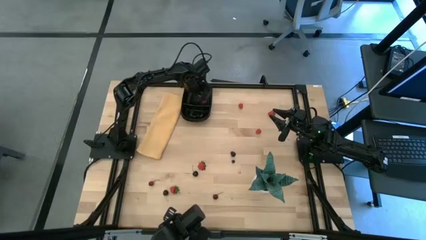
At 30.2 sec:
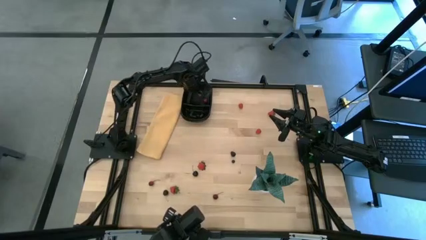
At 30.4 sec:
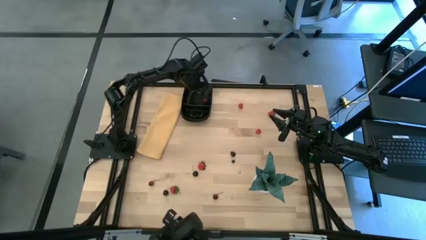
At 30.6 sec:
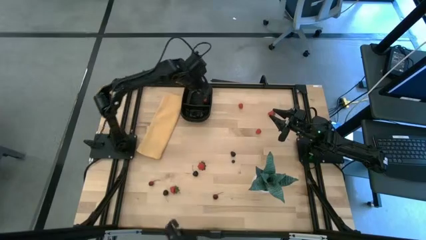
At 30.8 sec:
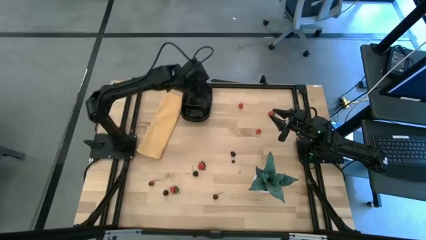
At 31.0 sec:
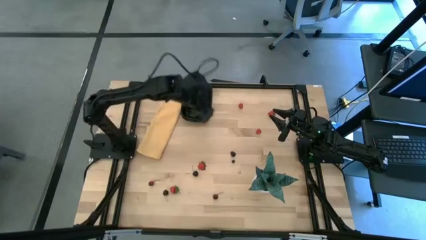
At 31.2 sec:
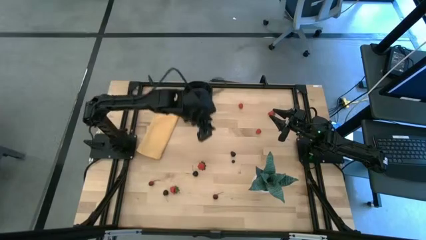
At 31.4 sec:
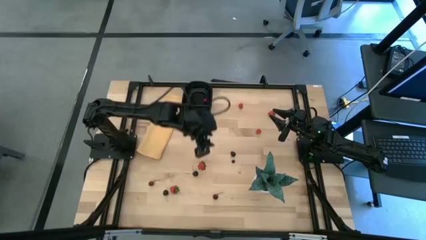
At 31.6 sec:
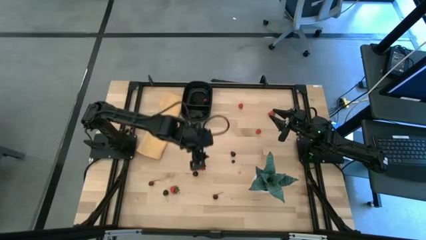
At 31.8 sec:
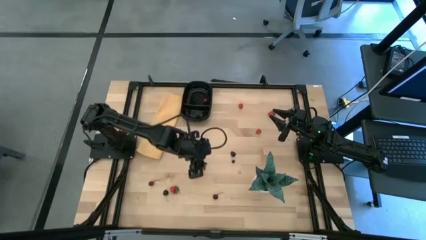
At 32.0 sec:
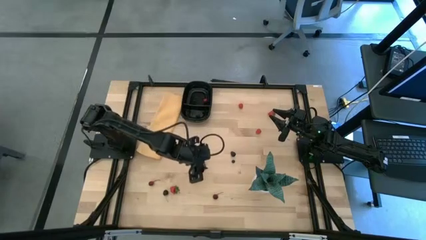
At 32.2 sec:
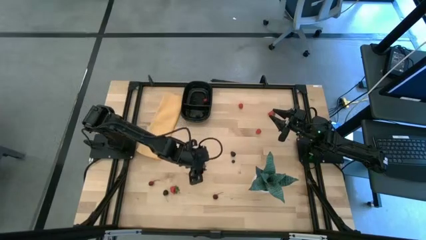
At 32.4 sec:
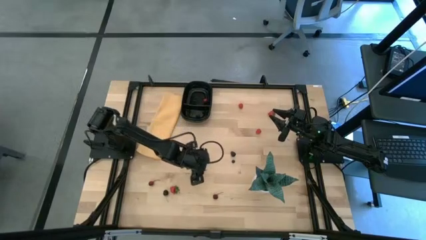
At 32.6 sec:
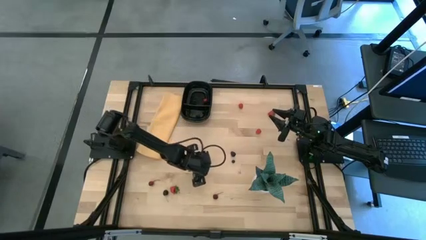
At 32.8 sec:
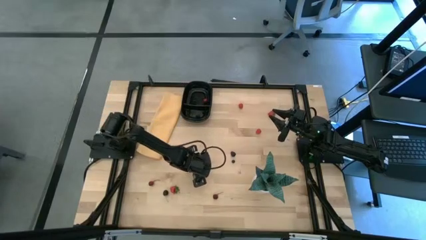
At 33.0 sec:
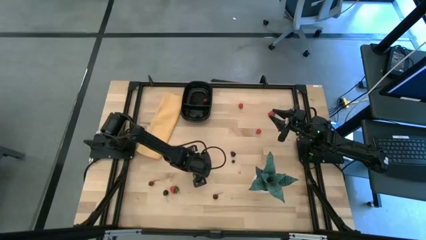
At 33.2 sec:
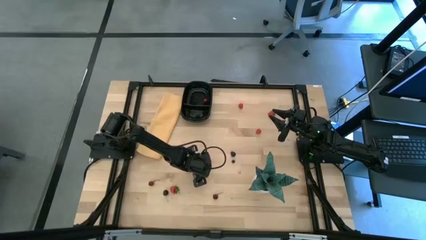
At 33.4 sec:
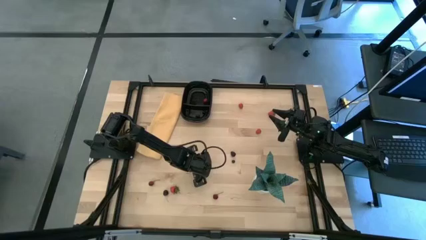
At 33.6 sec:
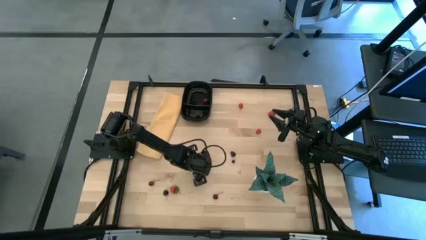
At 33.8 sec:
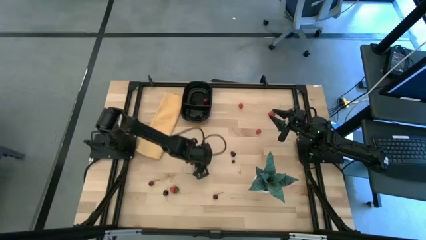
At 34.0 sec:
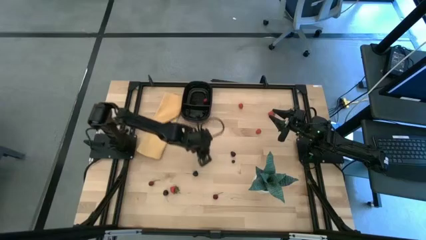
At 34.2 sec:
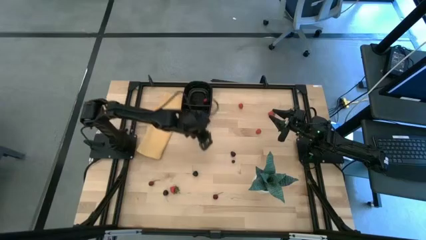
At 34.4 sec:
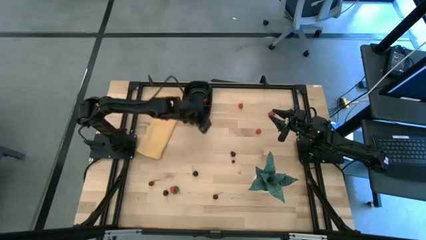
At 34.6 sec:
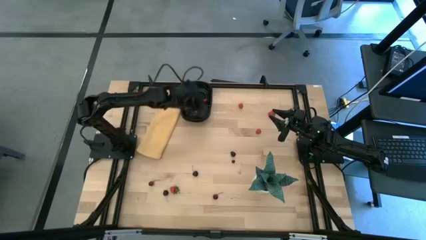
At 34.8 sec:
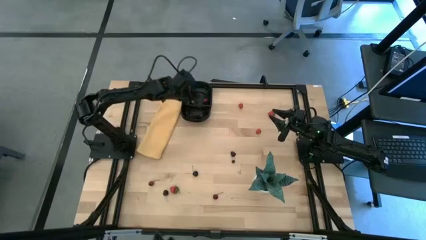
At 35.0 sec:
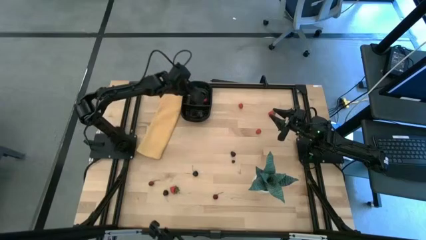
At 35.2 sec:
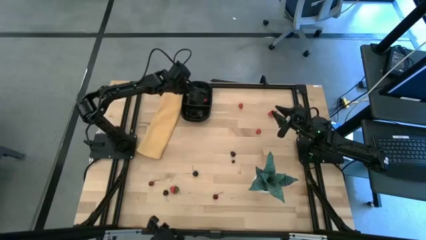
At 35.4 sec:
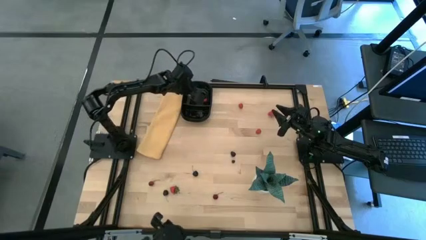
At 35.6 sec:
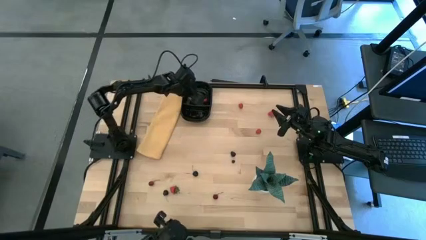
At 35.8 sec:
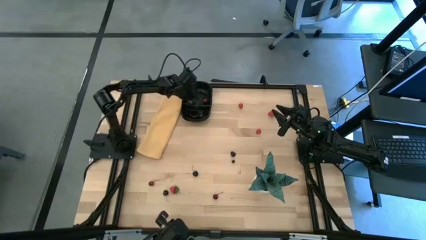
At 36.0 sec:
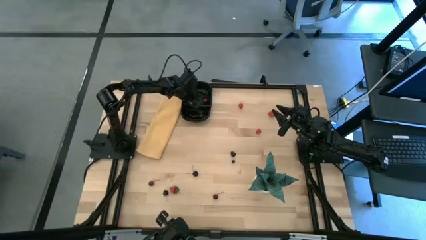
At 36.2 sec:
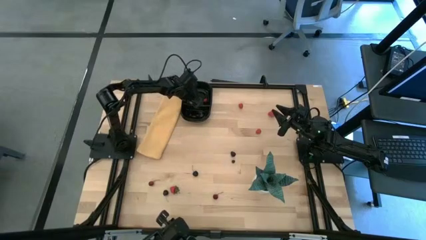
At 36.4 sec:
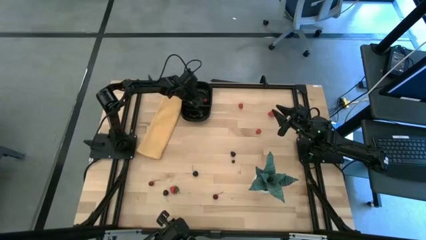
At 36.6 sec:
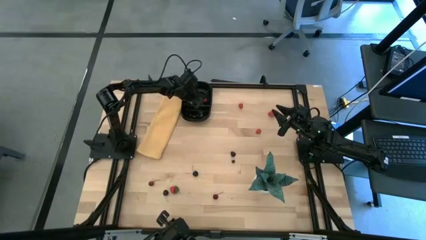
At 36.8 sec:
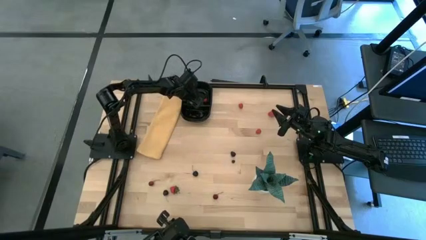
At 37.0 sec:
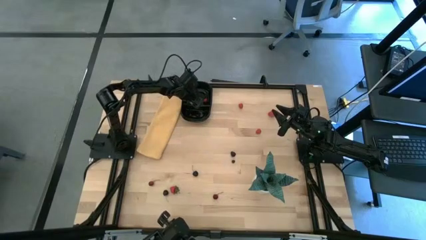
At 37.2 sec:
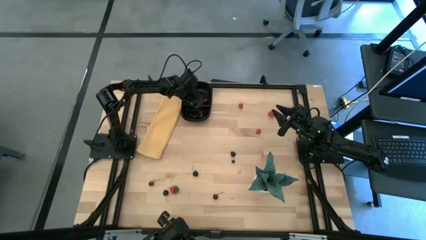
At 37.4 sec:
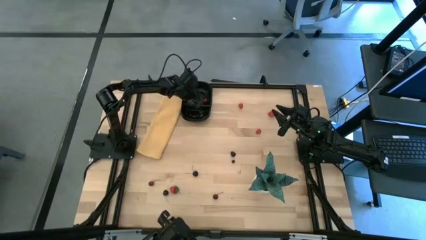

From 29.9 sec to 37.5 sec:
Task: Pick and placing Produce into tupperware
Put the middle red strawberry into the black bin

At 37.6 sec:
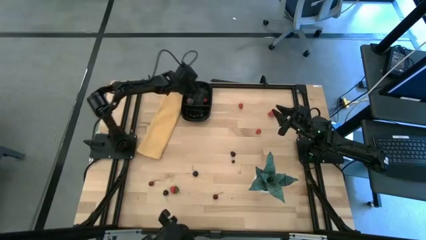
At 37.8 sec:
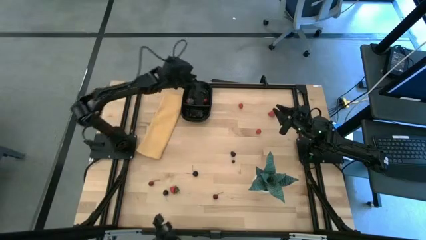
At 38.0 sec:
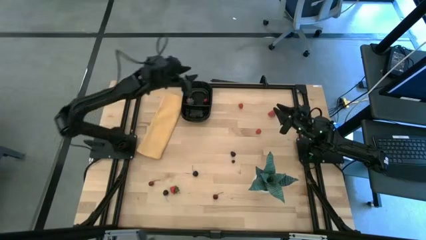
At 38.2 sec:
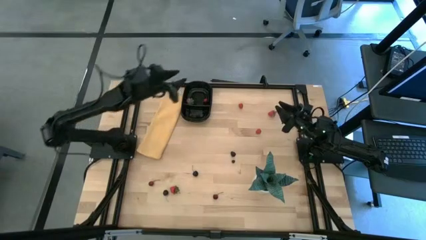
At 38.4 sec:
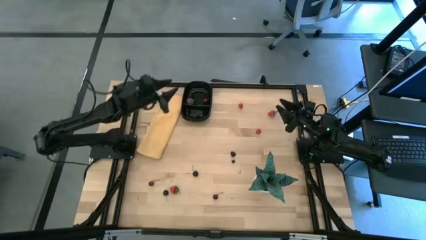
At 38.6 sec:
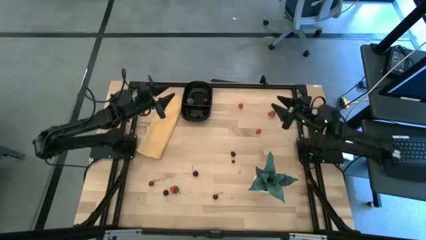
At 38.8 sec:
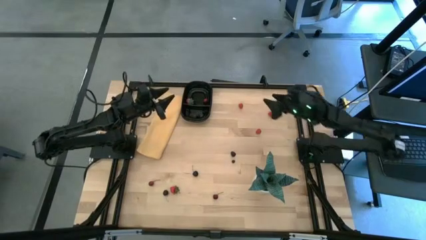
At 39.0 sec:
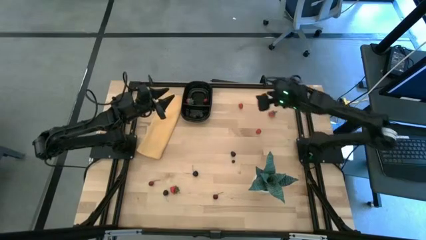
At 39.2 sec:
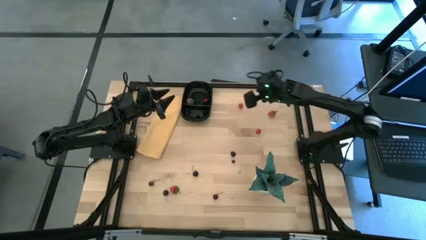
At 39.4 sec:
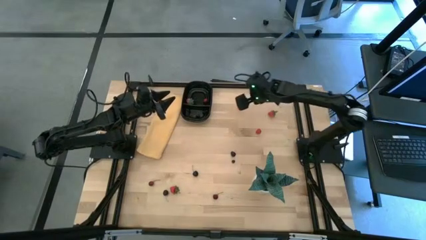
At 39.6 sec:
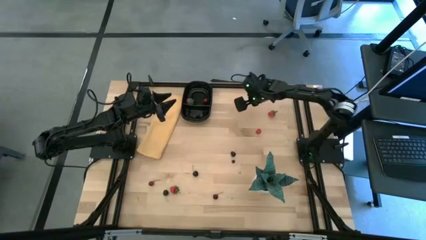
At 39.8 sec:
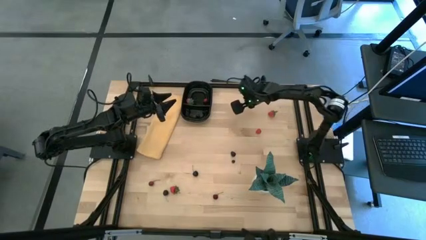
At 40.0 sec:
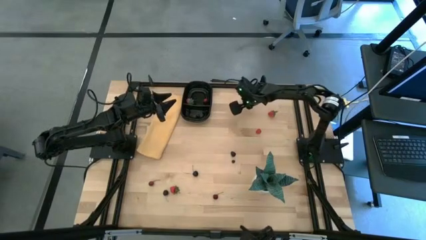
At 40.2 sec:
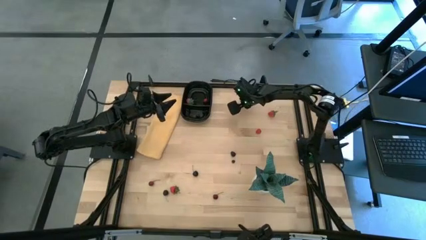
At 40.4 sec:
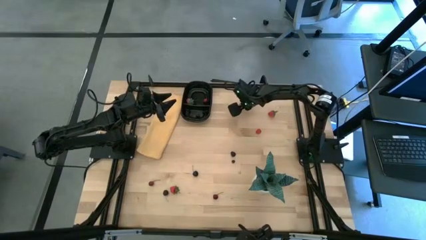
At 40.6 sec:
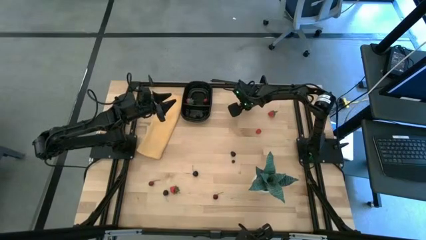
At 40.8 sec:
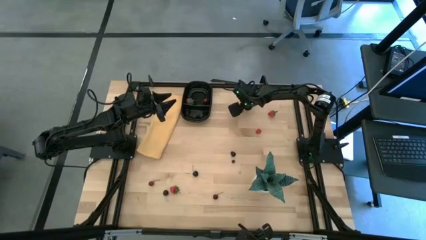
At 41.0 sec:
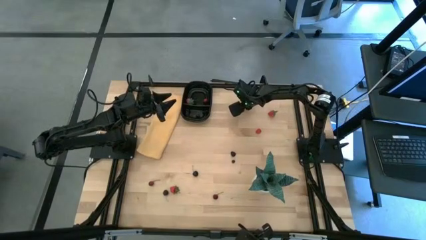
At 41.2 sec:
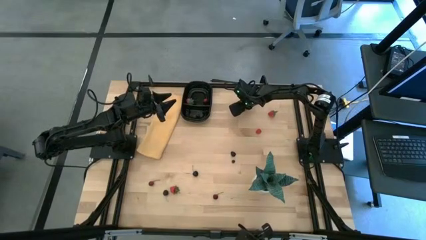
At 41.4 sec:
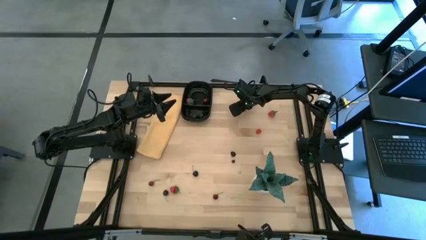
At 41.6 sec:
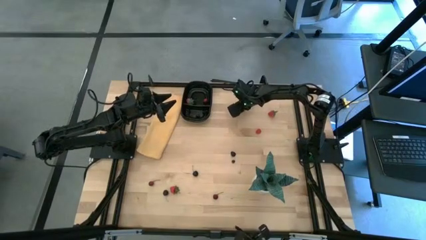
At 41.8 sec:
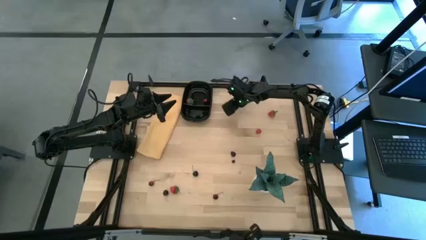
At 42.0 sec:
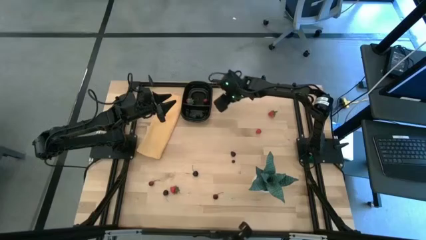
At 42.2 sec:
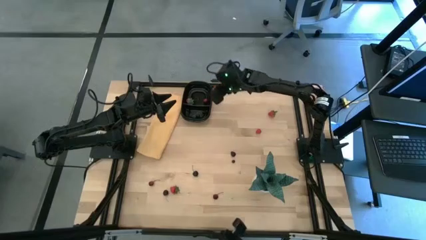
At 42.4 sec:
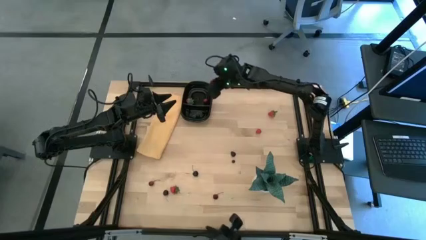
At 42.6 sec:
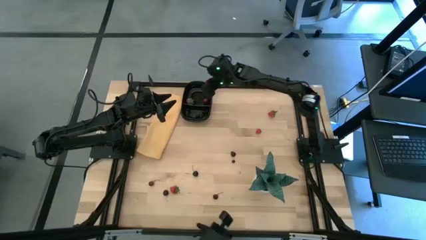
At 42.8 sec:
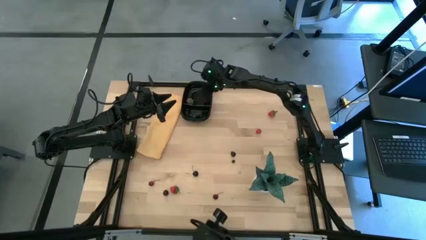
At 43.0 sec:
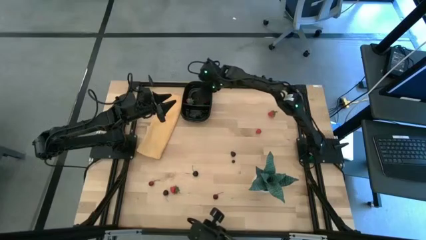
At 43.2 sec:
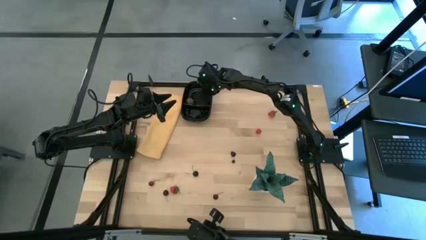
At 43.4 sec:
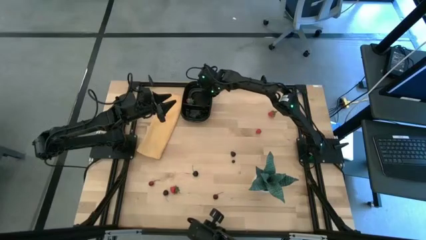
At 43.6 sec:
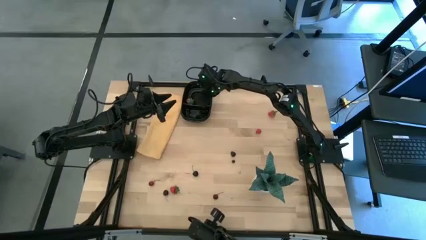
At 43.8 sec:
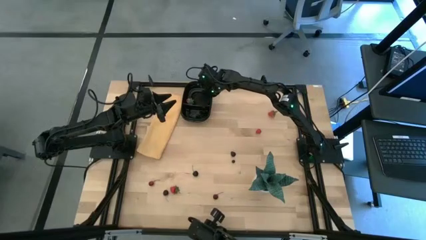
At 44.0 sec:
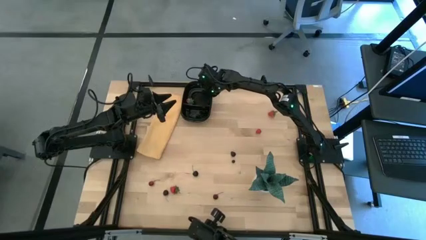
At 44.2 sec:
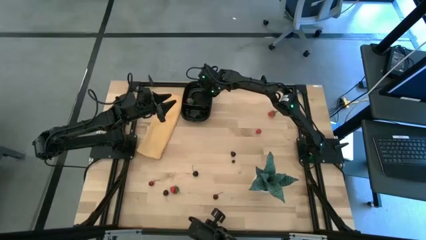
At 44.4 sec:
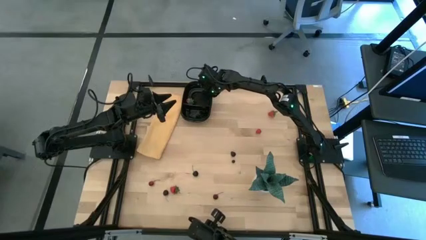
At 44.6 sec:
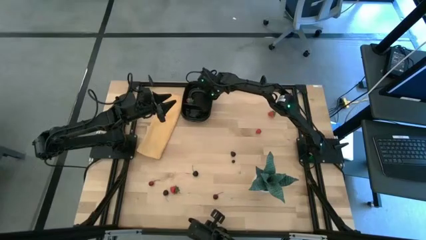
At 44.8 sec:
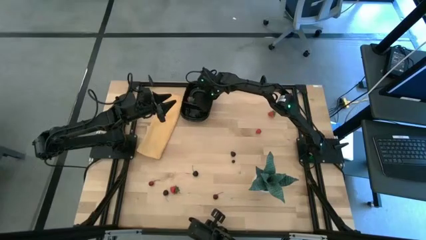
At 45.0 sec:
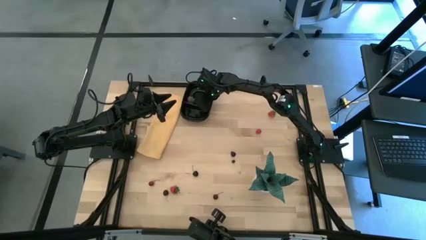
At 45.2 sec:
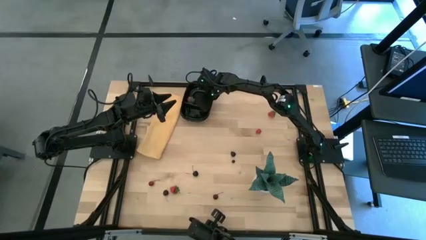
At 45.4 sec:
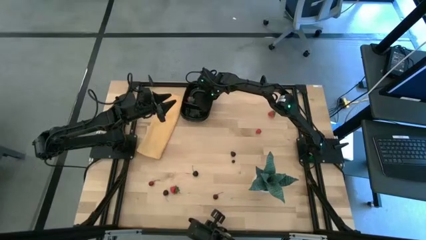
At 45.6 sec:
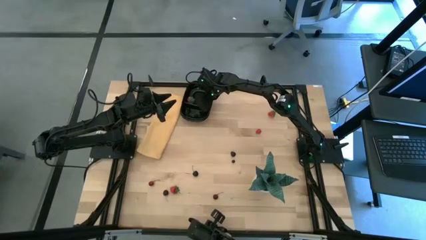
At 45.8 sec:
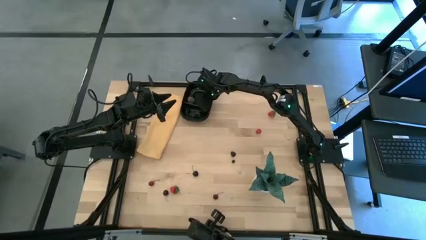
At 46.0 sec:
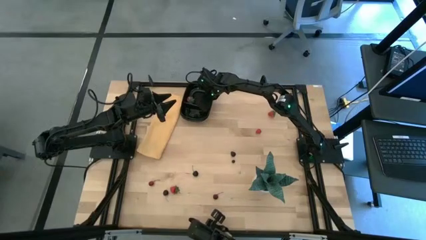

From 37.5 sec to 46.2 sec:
Put the top red raspberry into the black bin
